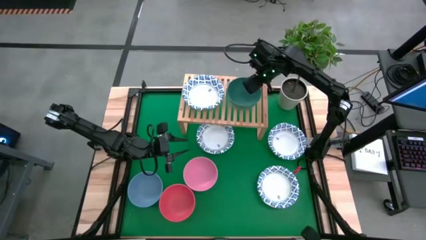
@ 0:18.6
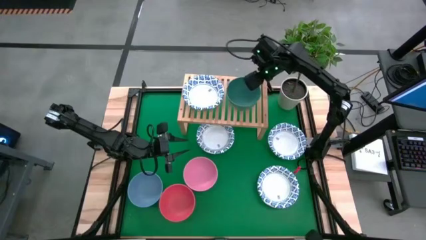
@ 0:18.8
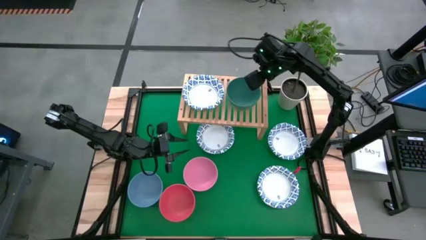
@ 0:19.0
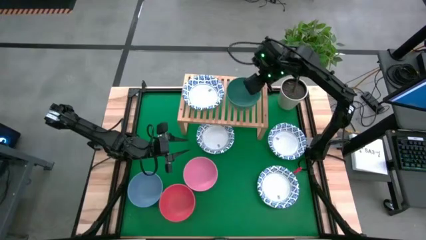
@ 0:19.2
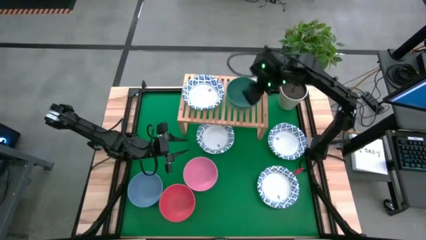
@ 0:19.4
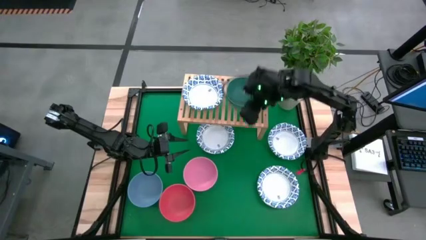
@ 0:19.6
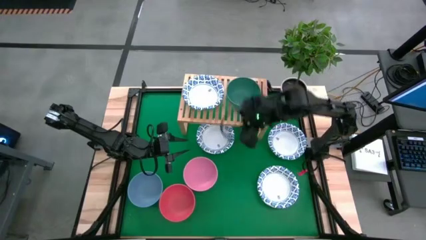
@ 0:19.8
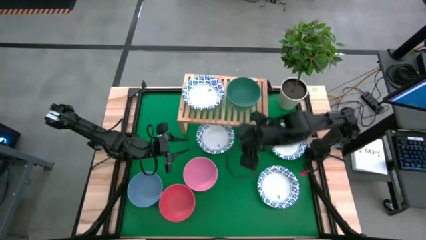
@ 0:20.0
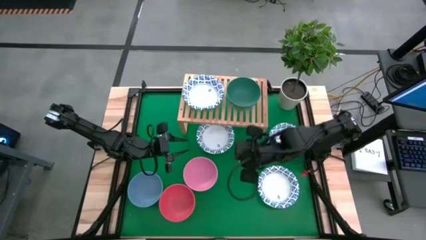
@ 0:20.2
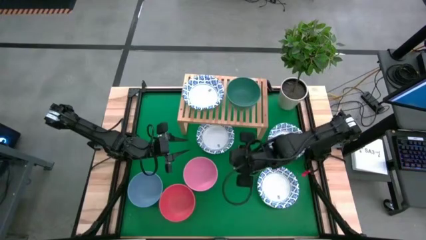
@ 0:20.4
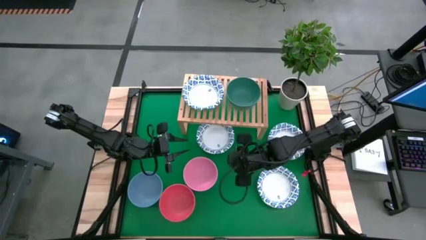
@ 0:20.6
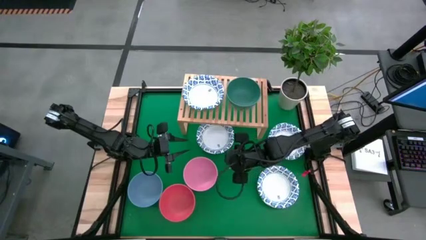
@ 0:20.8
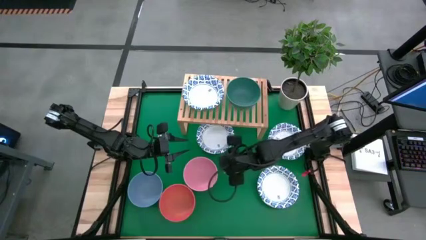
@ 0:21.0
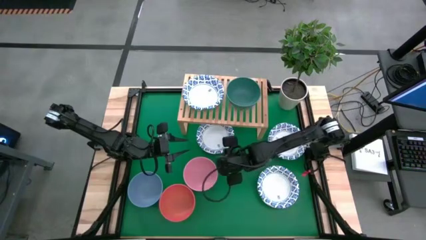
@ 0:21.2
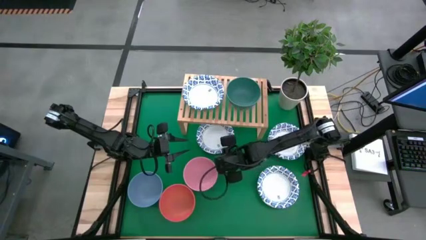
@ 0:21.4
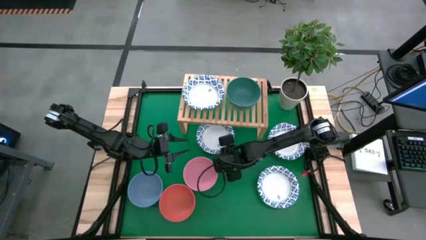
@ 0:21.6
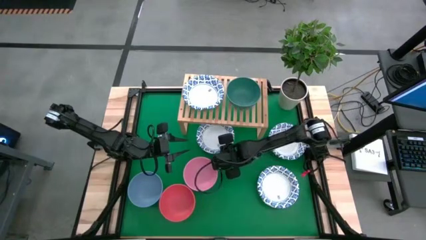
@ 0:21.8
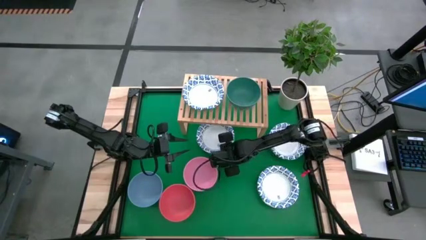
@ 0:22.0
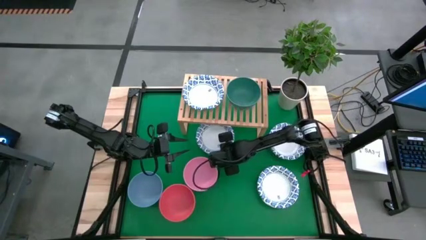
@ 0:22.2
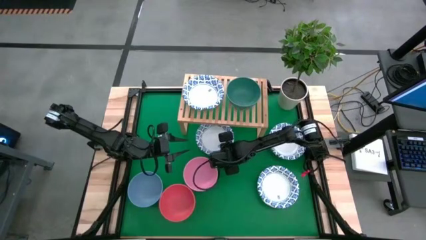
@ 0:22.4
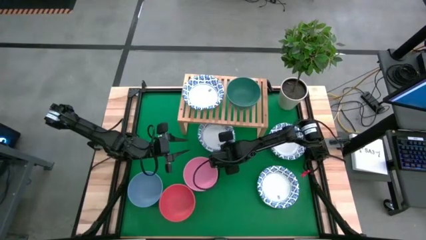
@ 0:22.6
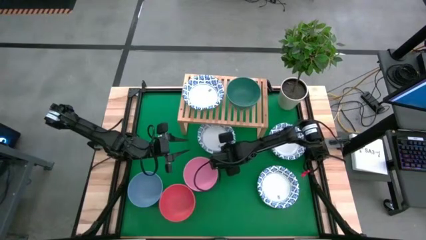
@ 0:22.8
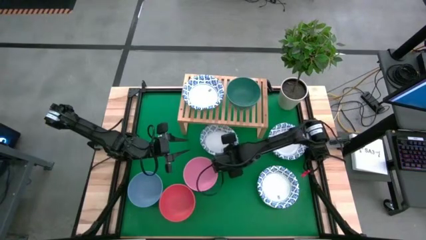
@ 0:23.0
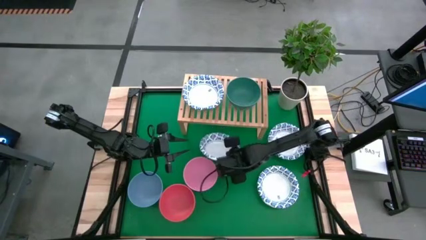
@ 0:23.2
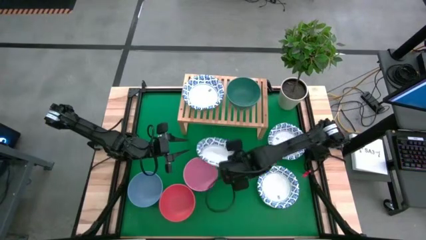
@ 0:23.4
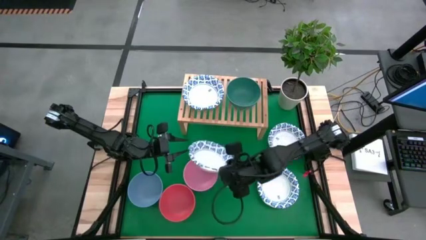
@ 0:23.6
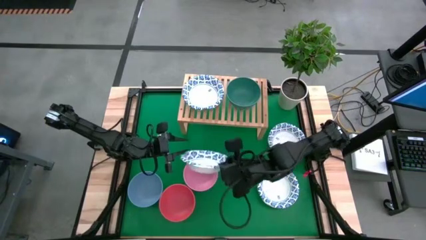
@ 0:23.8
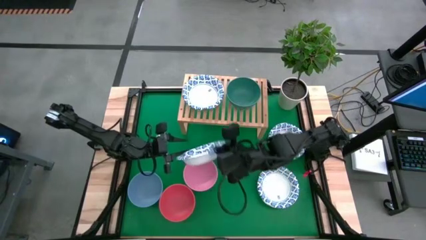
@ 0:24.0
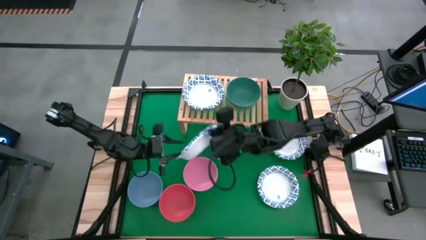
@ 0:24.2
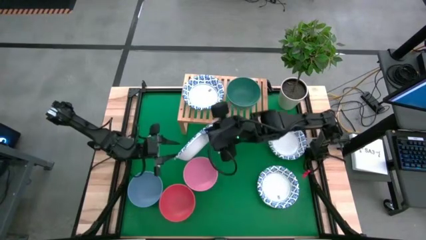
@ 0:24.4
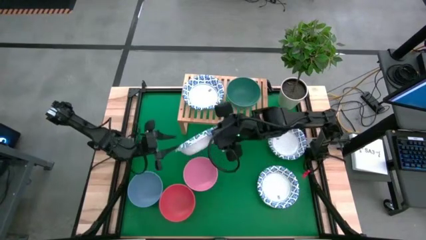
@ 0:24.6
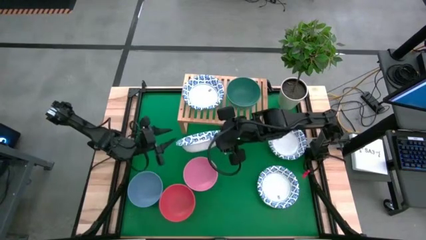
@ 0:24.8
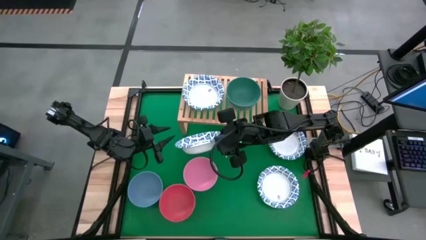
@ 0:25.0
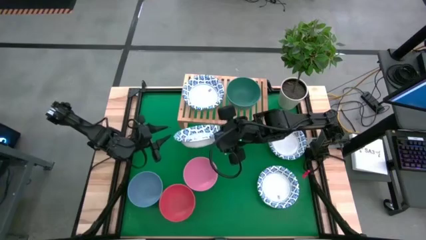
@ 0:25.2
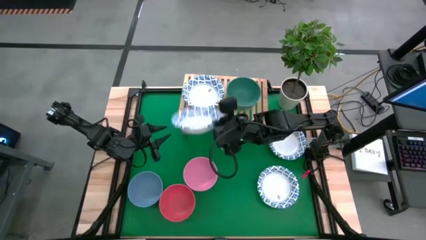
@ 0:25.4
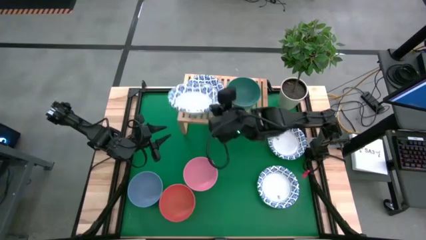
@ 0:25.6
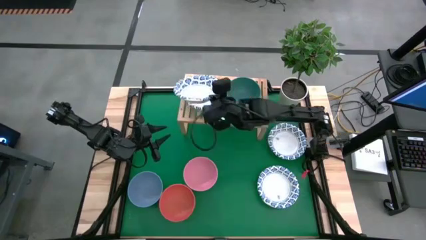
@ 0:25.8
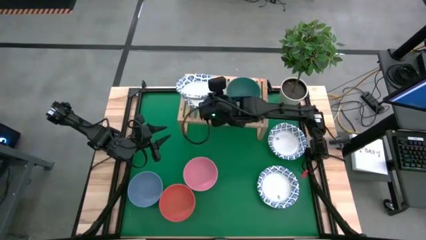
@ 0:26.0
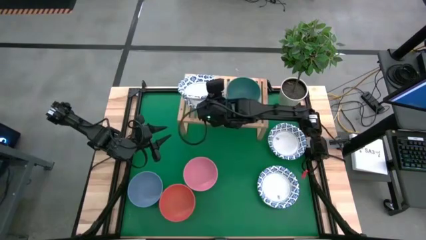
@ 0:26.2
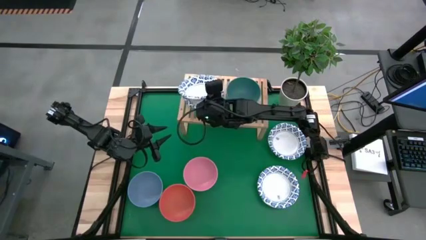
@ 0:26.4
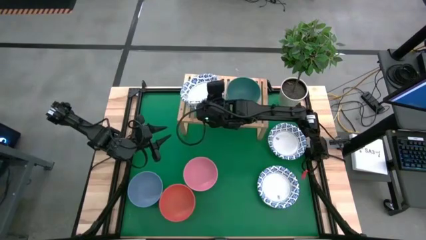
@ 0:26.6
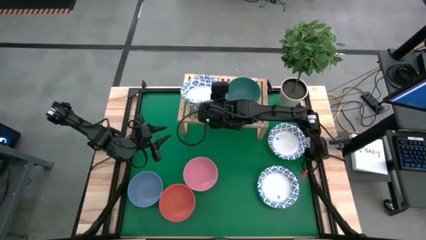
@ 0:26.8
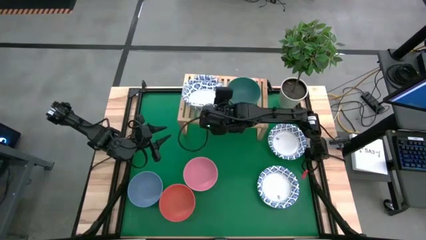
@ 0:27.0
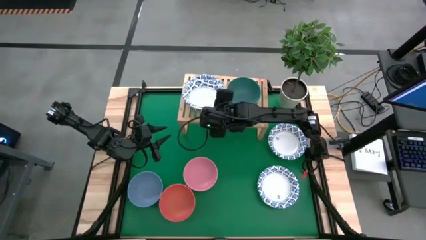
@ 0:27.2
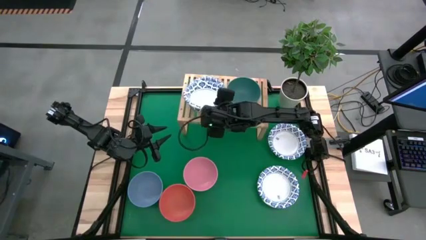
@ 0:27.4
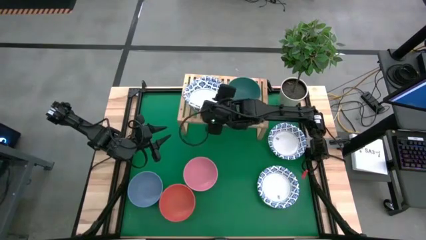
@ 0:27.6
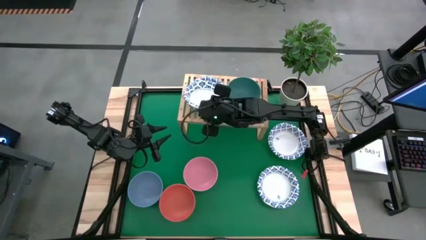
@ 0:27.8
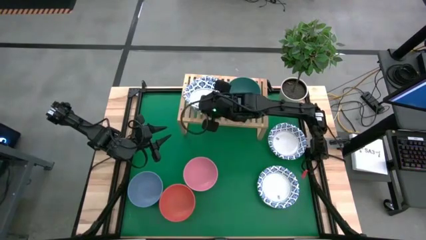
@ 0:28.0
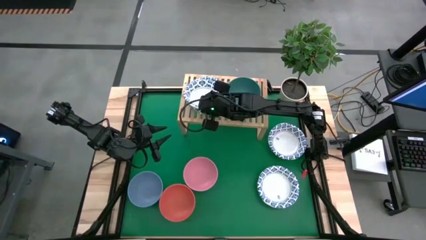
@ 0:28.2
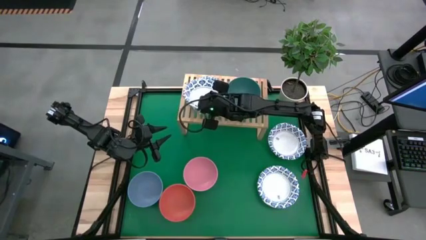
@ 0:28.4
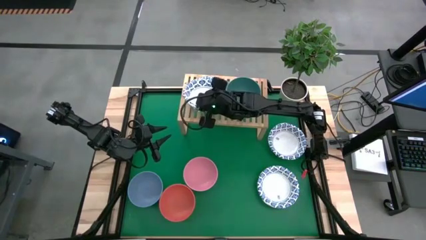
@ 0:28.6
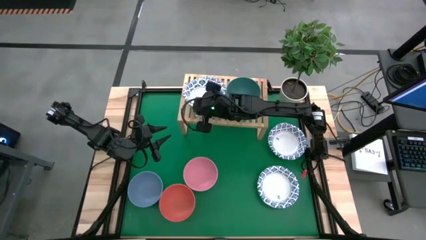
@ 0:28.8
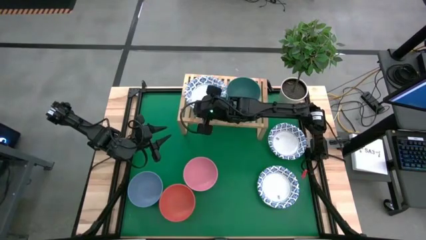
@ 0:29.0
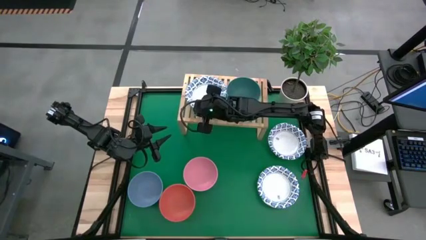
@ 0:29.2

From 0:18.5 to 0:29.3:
Task: Place and stack bowls onto a shelf
Stack the white patterned bowl on top of the white patterned bowl on the shelf

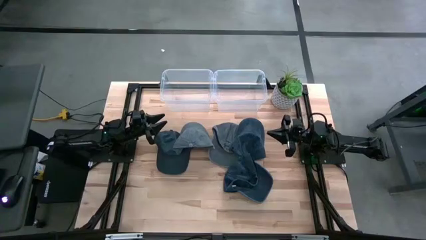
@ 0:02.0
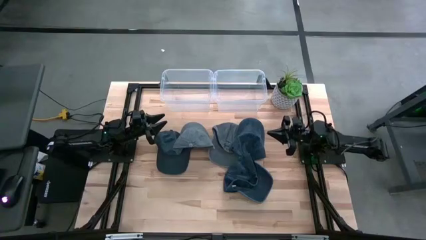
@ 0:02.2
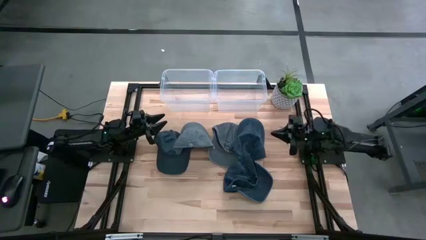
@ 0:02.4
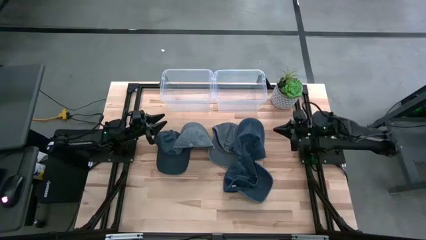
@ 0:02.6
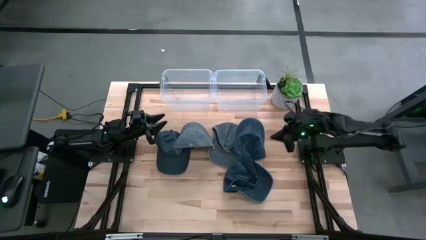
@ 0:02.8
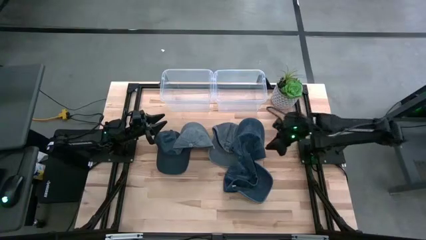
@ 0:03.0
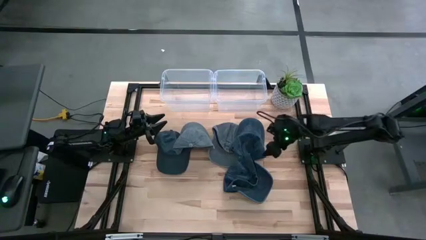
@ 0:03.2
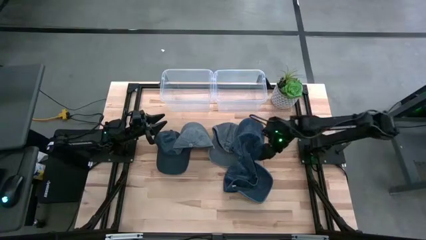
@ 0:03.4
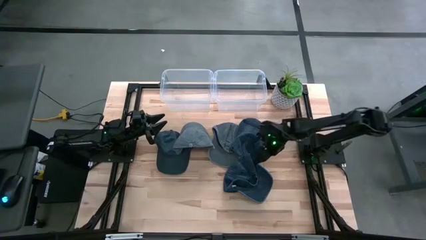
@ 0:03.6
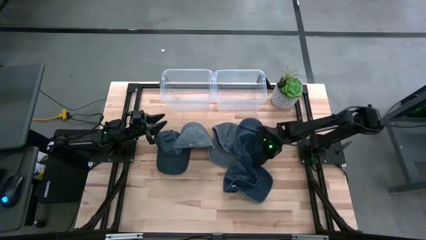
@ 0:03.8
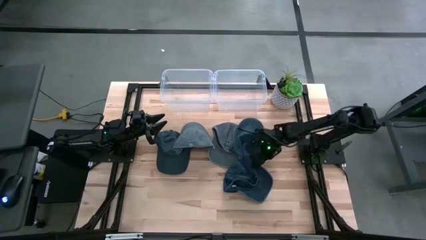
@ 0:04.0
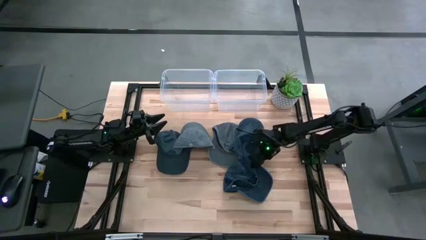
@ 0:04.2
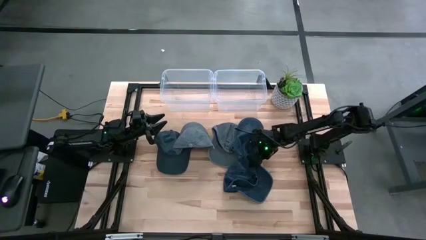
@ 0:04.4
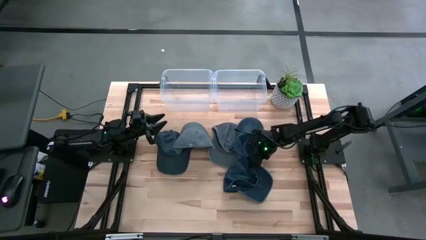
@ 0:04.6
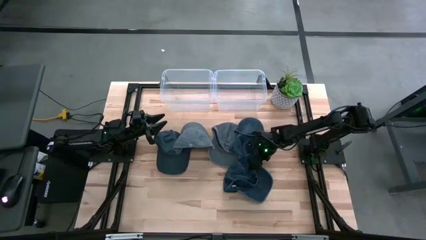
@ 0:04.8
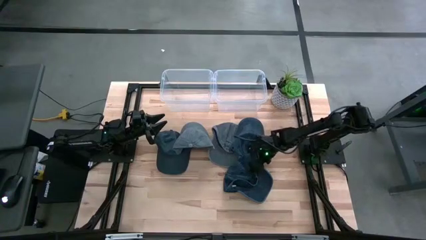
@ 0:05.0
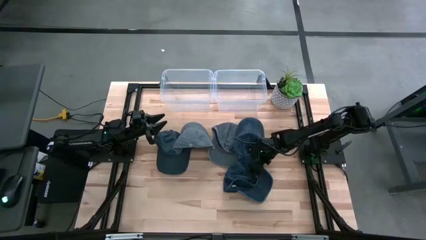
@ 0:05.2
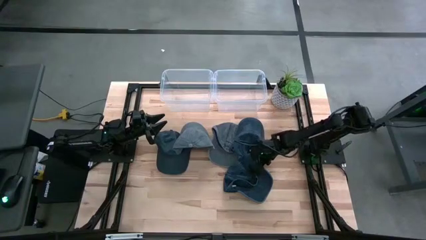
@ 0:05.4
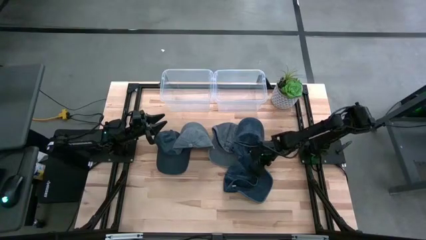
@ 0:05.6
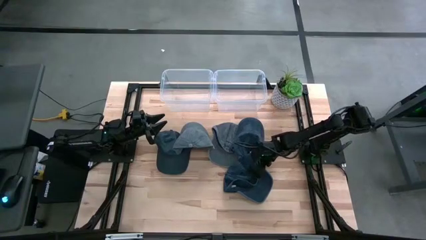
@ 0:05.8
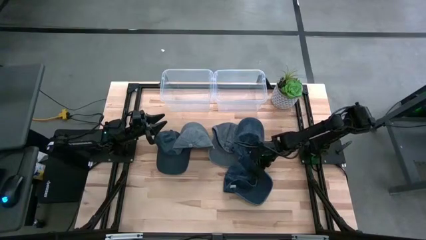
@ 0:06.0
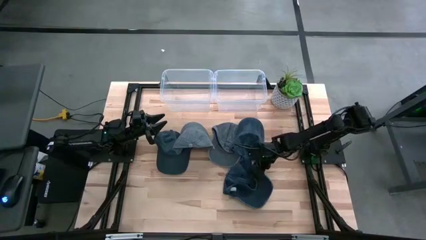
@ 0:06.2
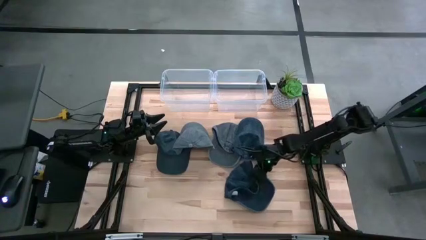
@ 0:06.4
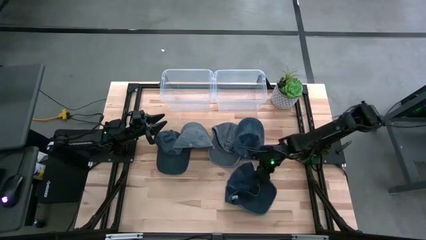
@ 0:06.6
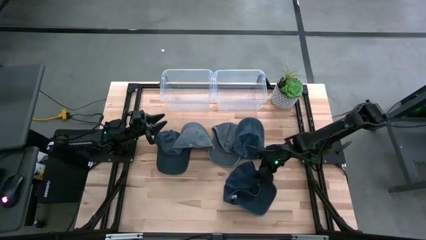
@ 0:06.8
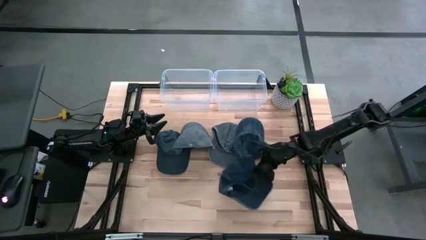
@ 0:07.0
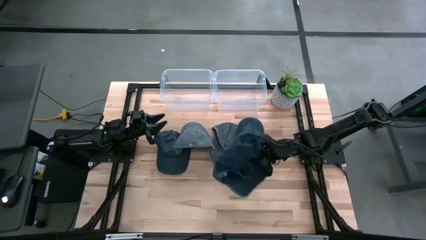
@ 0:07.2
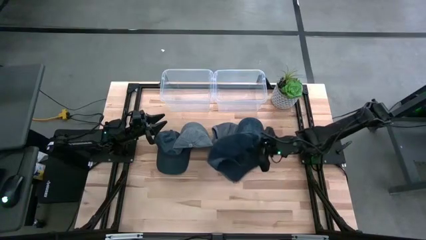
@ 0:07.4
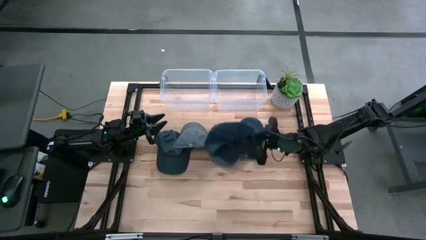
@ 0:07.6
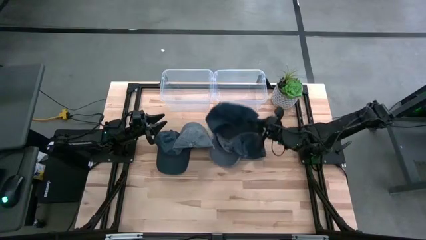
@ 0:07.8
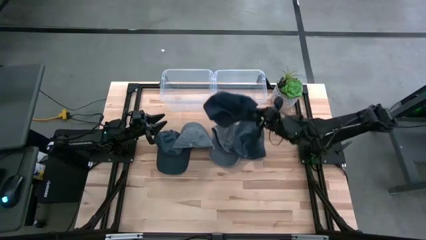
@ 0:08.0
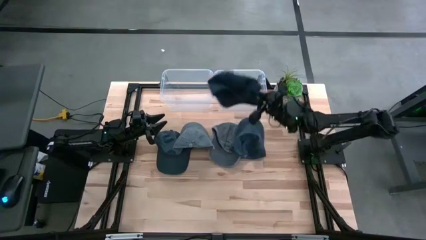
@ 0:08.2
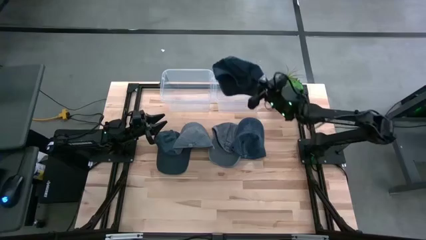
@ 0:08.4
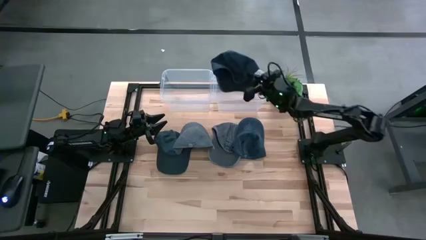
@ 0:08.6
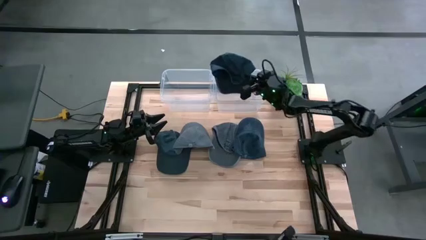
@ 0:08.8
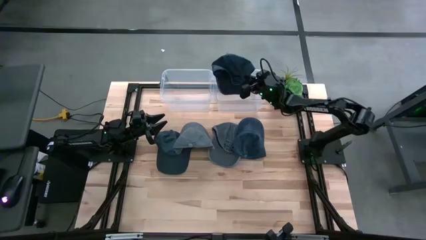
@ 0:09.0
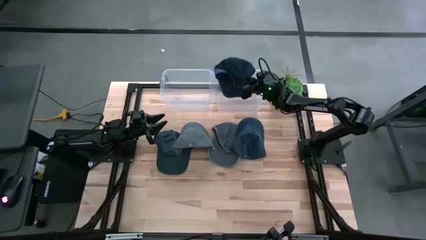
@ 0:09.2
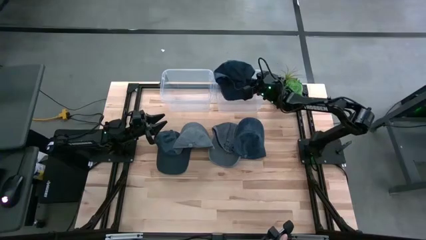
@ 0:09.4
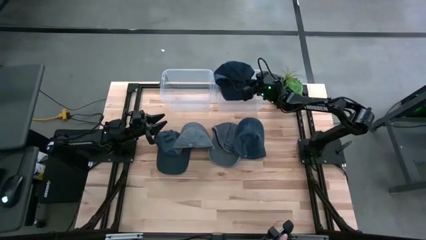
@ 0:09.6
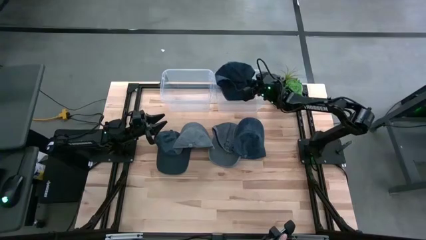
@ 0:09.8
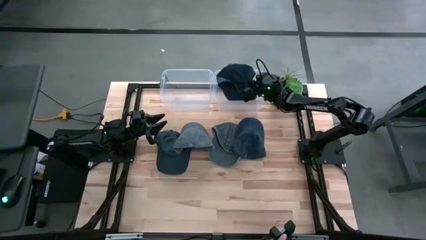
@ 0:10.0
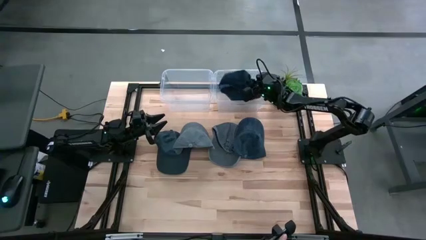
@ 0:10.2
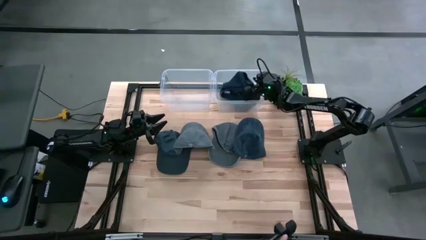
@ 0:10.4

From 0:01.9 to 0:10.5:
Task: Pick & Place hat
Put the bottom blue cap into the right transparent bin
